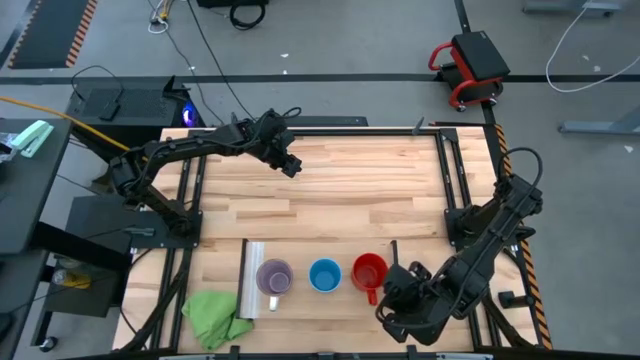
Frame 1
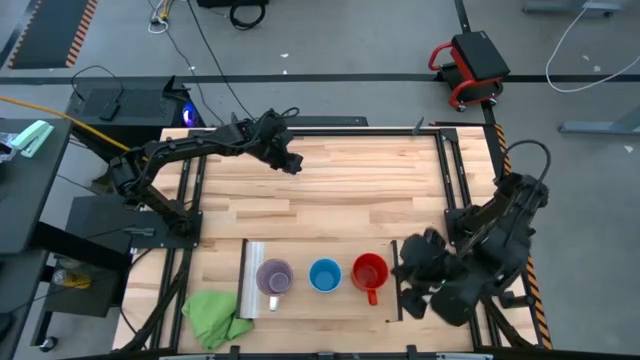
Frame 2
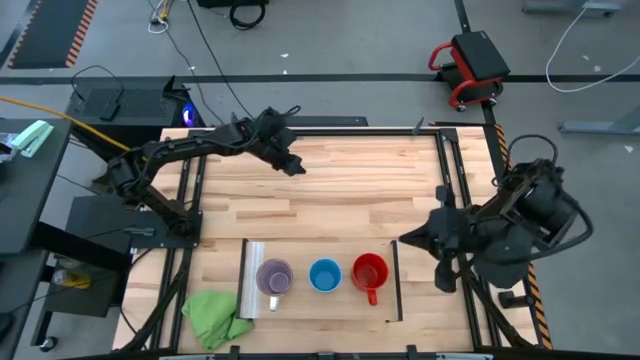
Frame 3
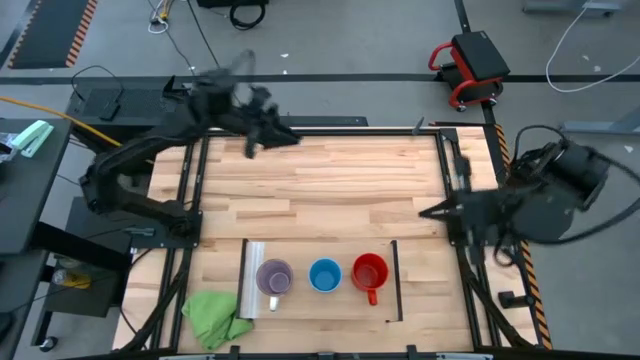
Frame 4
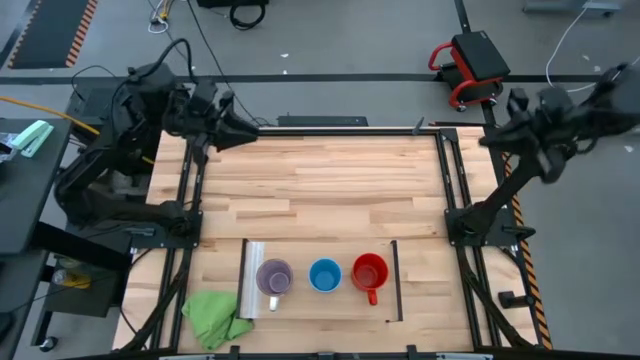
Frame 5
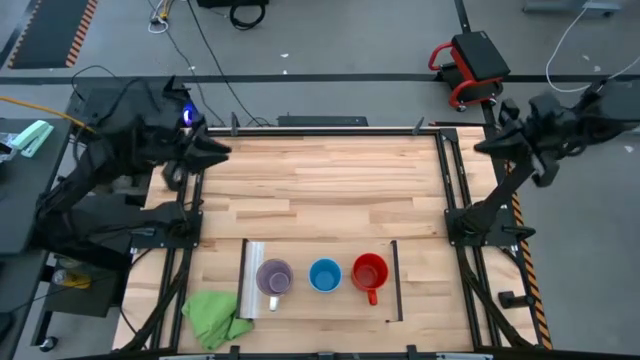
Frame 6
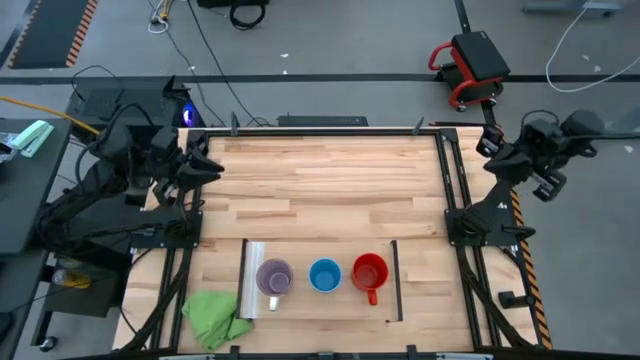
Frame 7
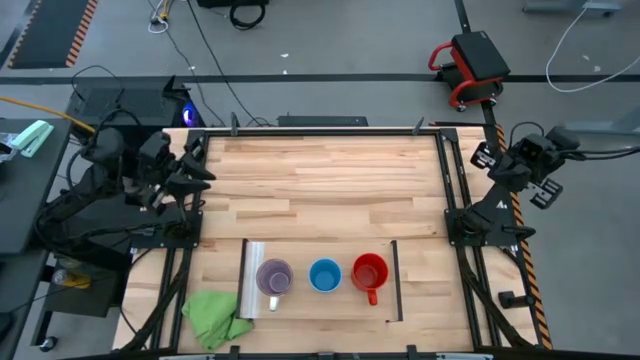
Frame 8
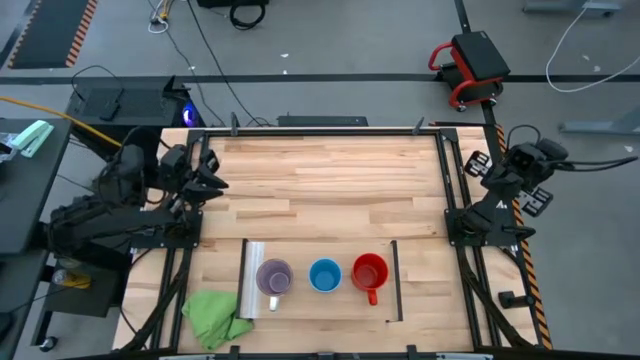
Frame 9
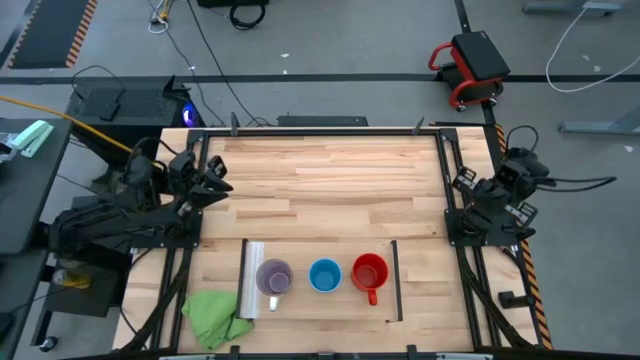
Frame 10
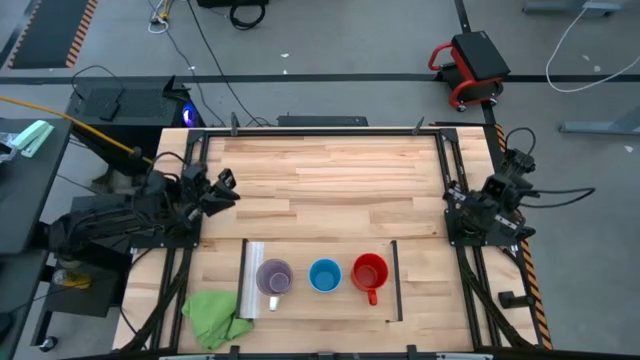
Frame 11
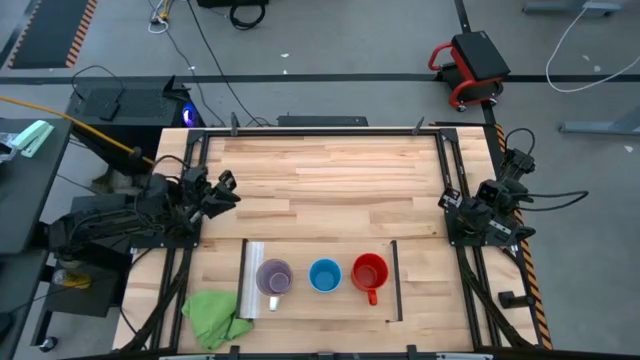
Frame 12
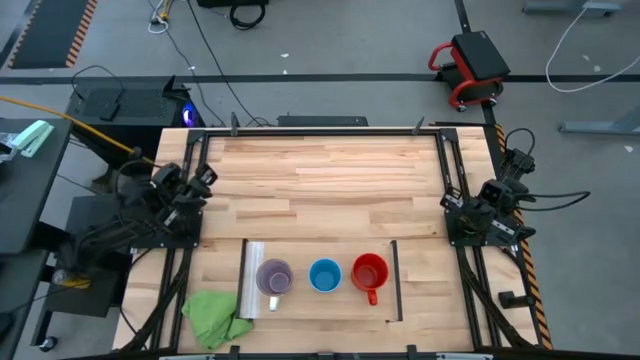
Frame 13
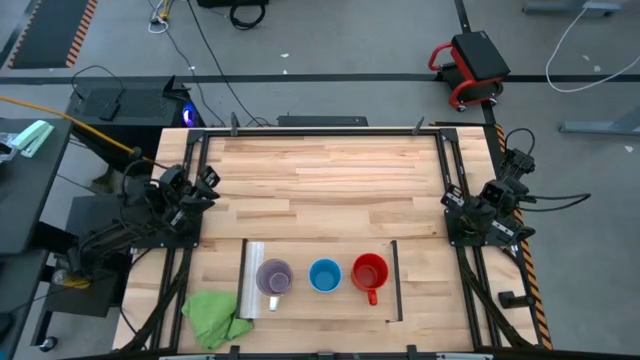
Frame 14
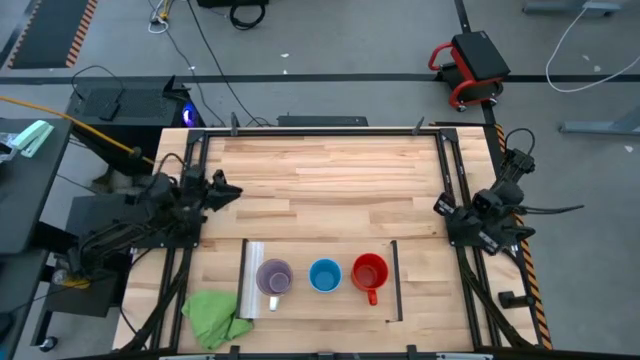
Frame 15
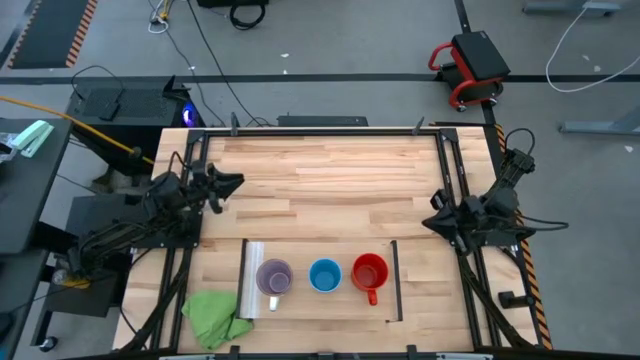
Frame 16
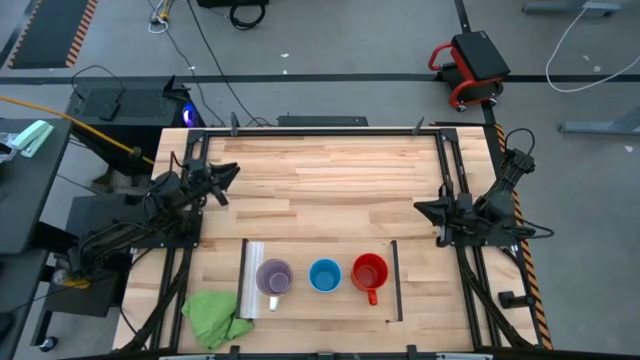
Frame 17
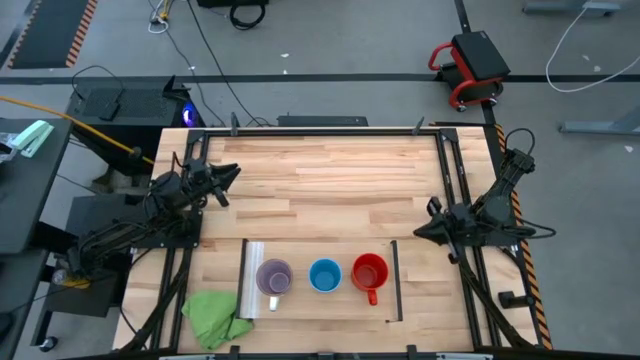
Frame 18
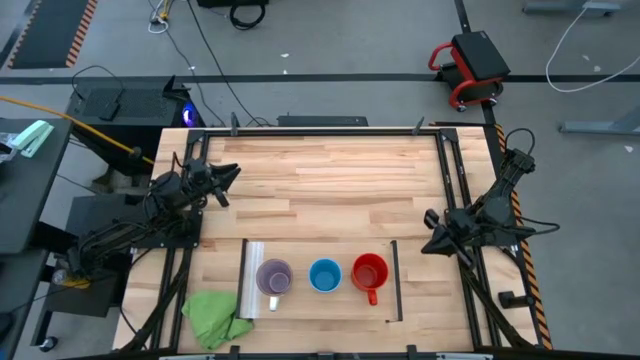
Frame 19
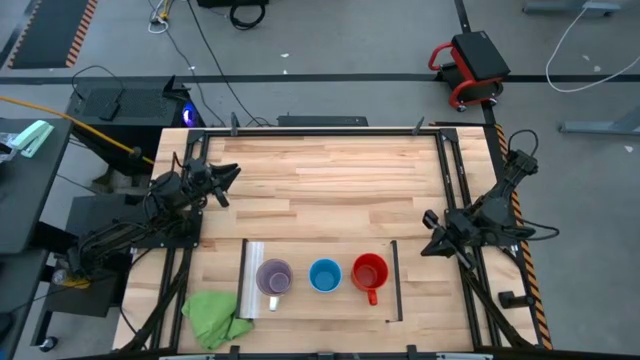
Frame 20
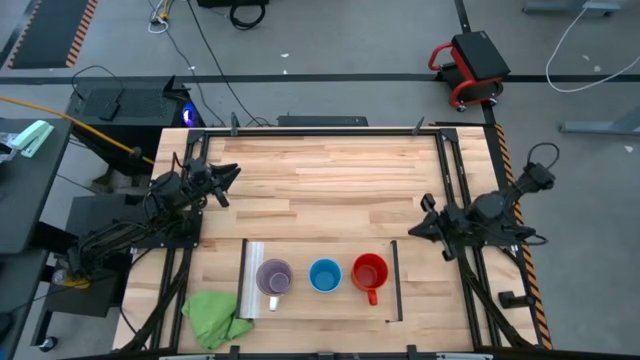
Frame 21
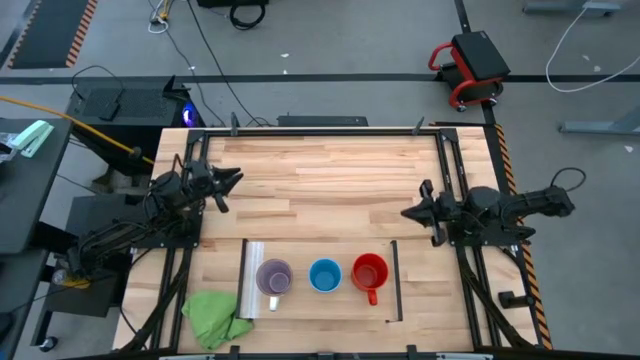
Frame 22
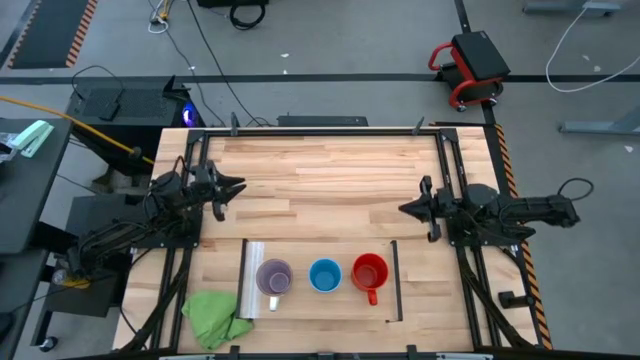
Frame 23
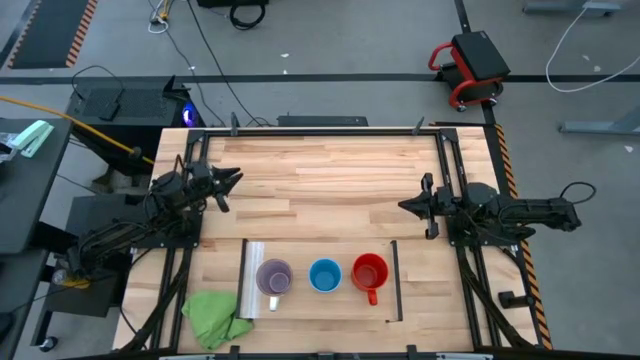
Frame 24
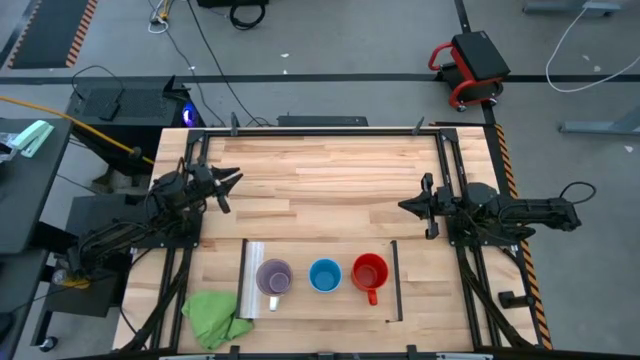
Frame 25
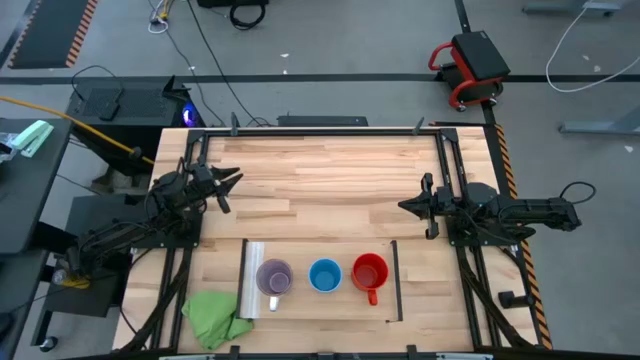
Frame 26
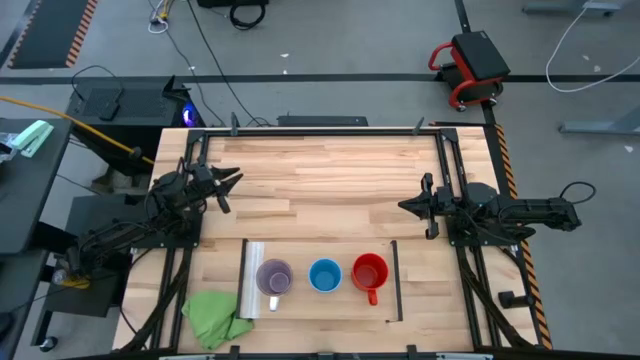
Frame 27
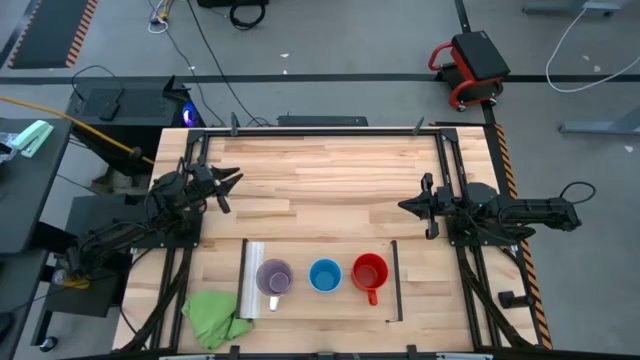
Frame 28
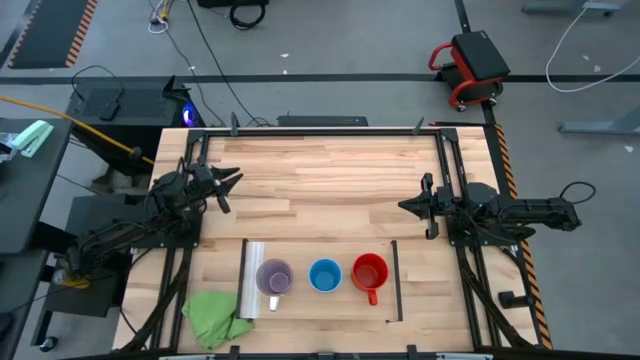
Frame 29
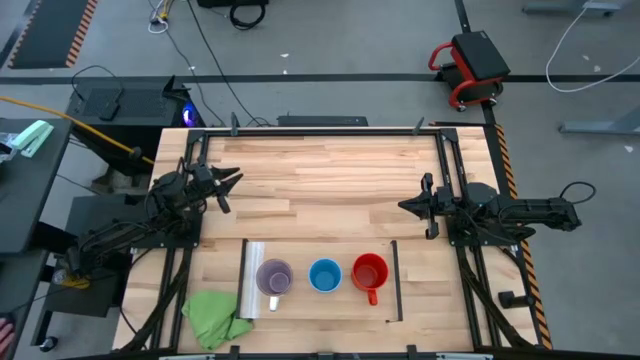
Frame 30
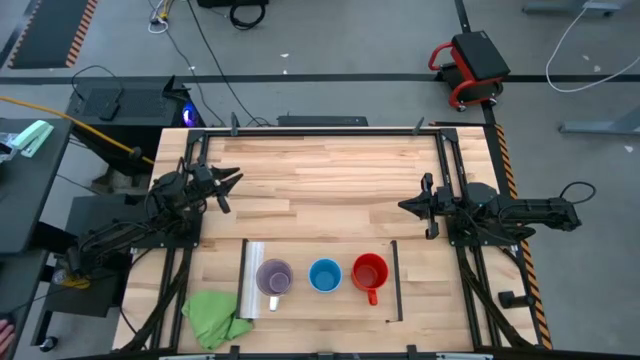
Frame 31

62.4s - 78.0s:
Task: Stack small to large cups/mugs on shelf
Return to Home Position

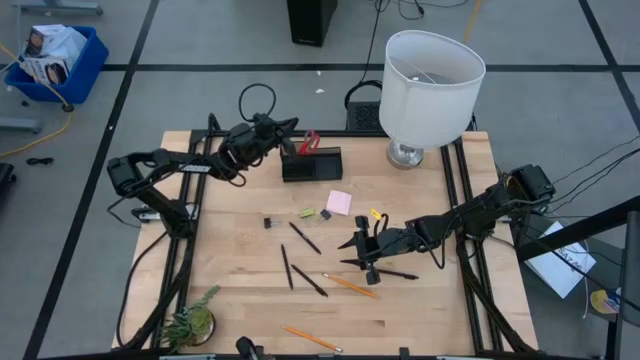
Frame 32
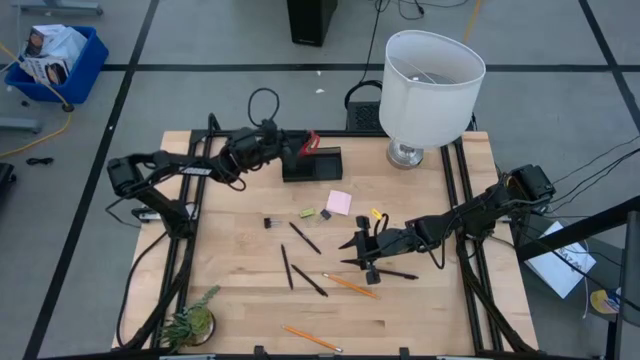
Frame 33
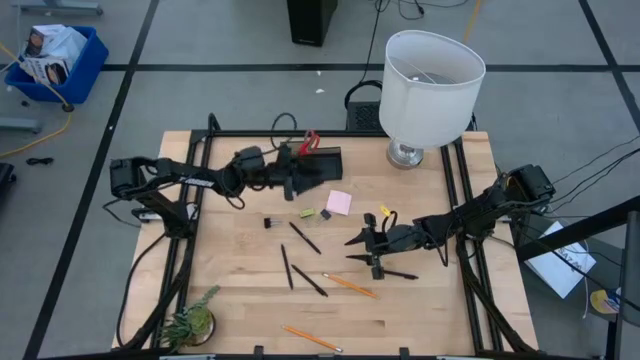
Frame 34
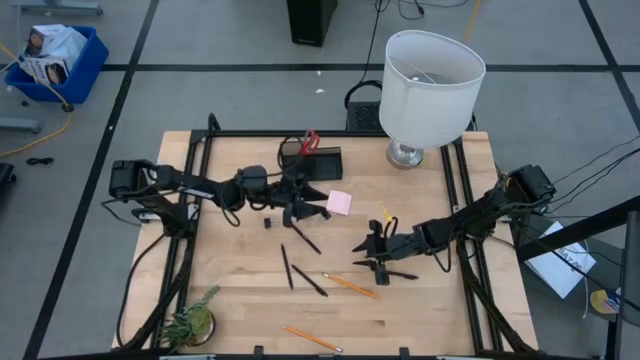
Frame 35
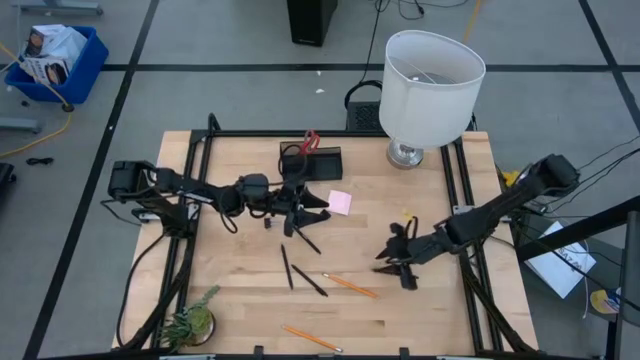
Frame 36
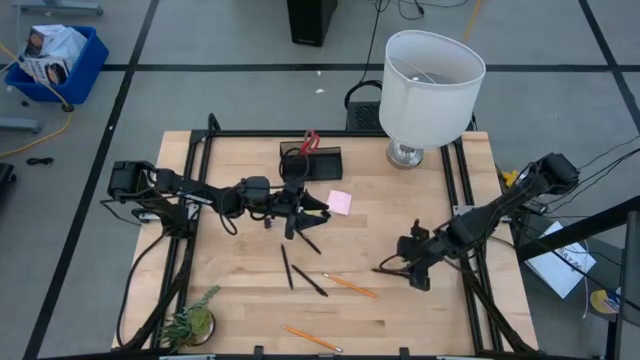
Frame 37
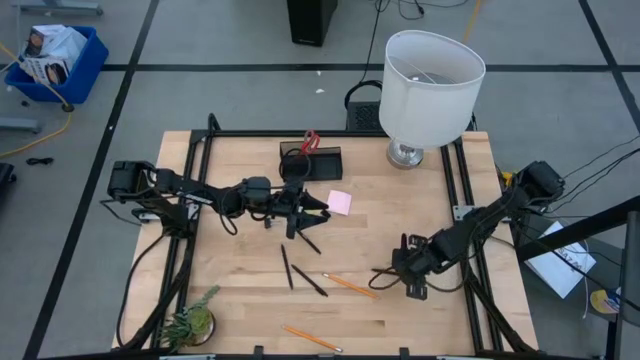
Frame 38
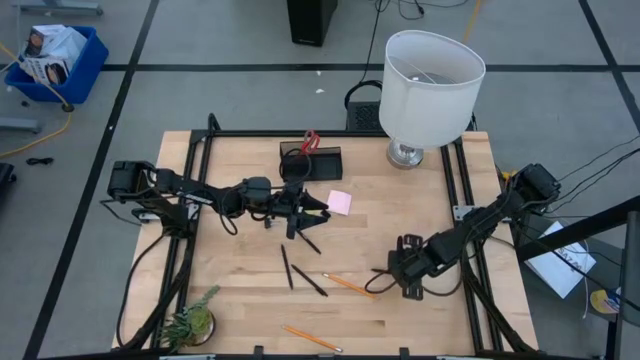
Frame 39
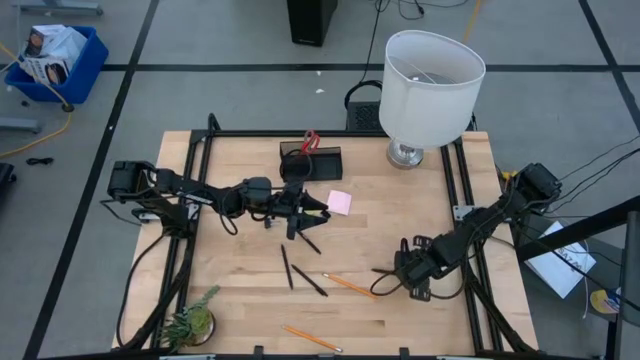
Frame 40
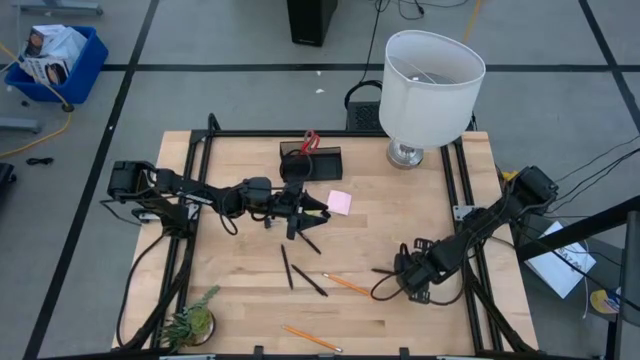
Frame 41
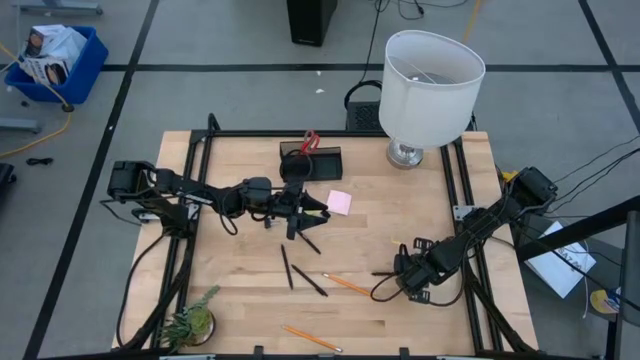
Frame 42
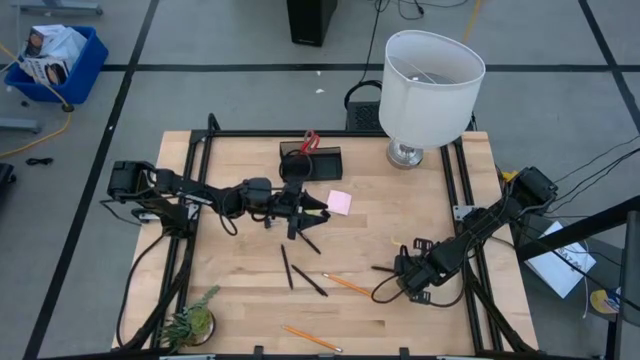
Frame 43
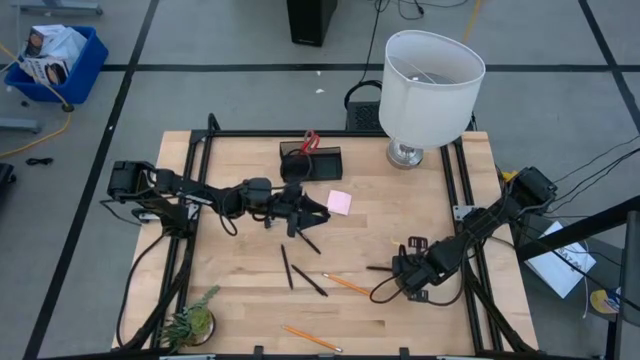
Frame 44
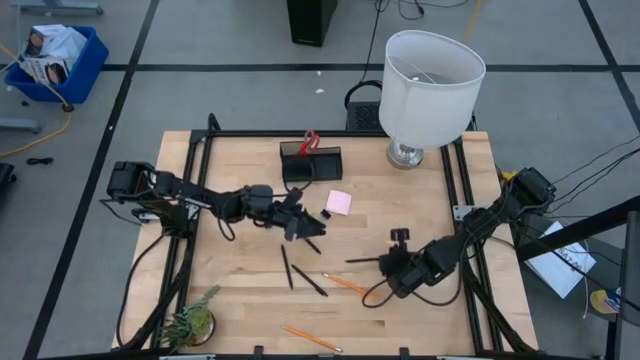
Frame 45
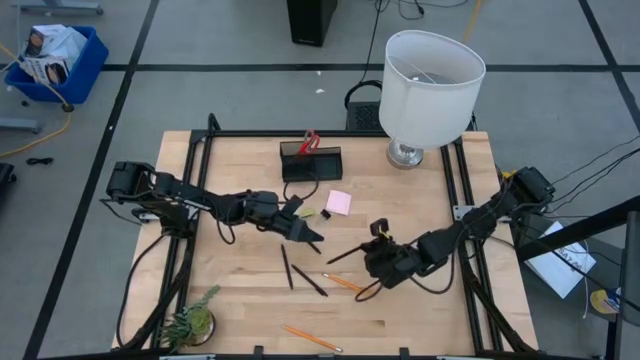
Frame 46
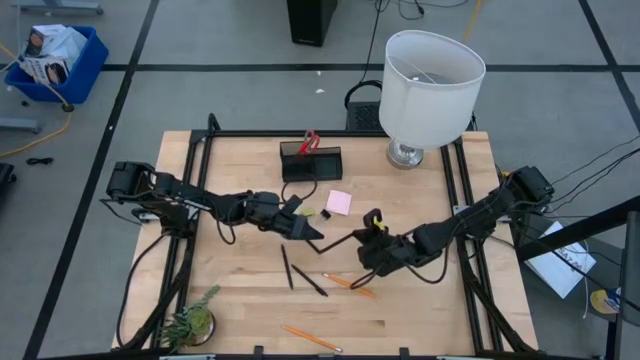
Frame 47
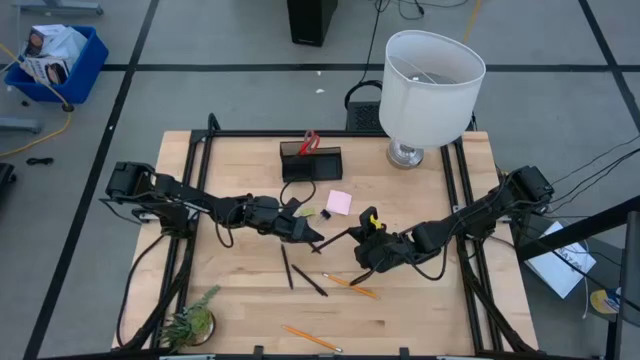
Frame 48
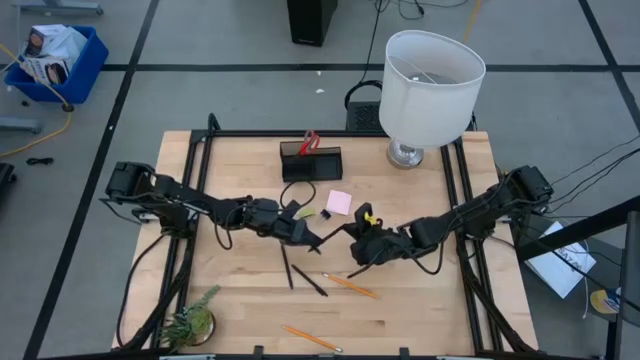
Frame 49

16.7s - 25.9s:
Task: Pick and place office supplies into organizer
Put the black pen into the black desk organizer
